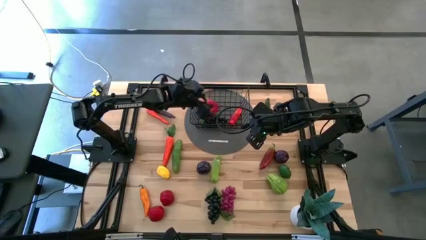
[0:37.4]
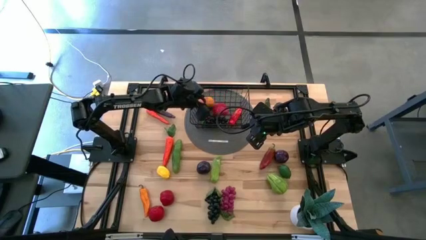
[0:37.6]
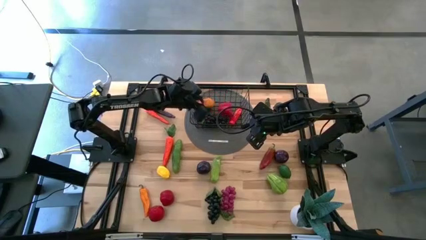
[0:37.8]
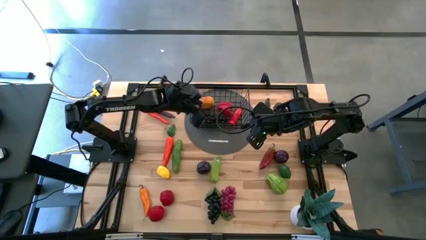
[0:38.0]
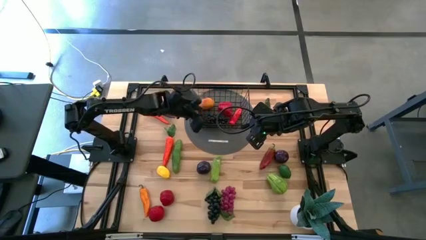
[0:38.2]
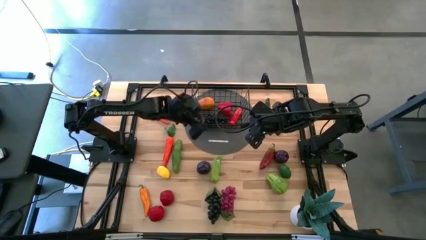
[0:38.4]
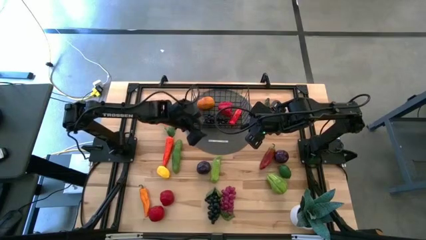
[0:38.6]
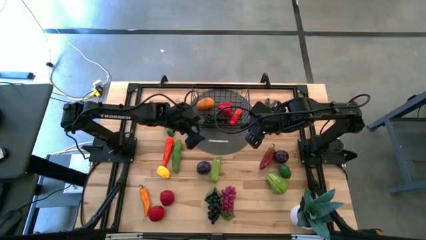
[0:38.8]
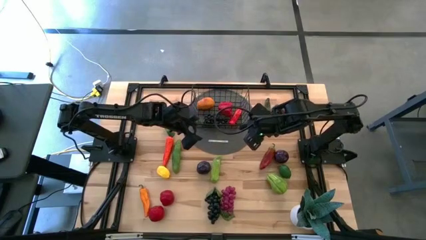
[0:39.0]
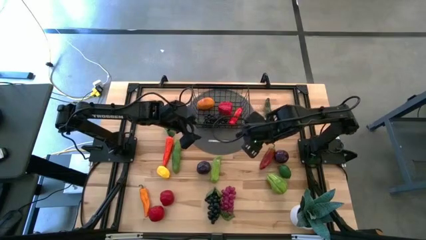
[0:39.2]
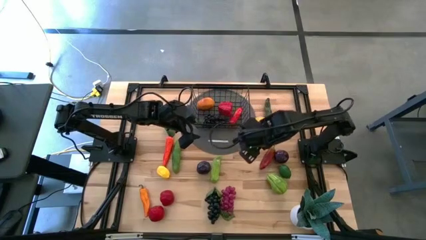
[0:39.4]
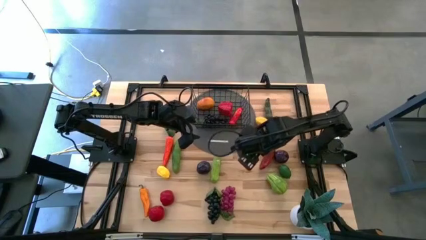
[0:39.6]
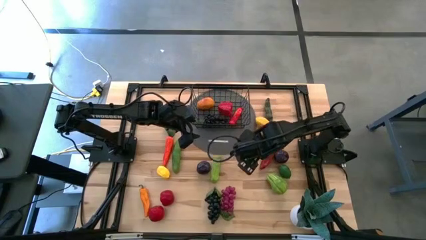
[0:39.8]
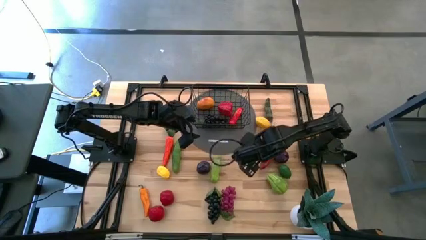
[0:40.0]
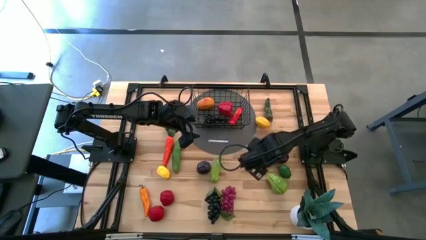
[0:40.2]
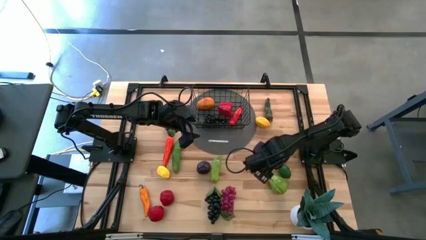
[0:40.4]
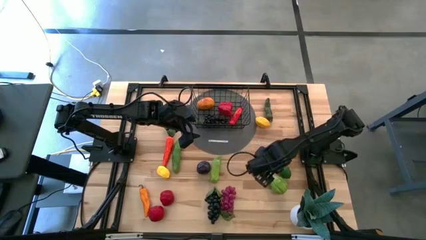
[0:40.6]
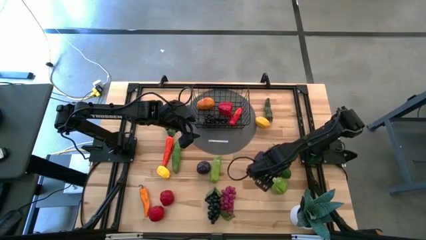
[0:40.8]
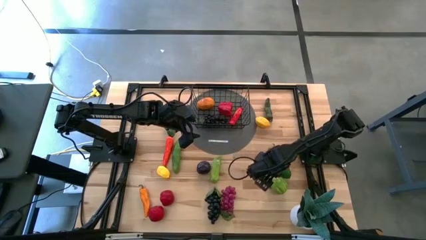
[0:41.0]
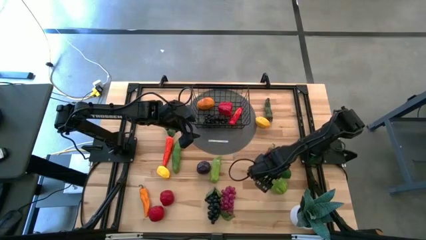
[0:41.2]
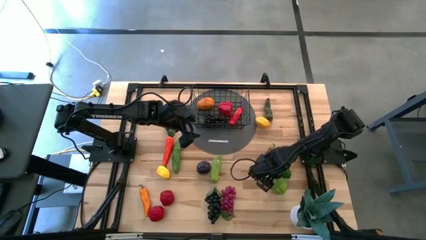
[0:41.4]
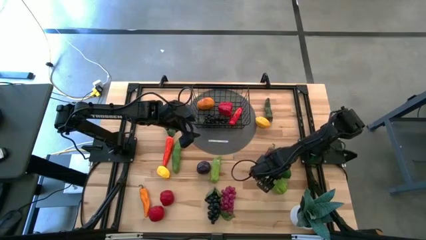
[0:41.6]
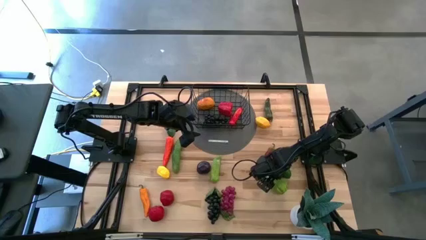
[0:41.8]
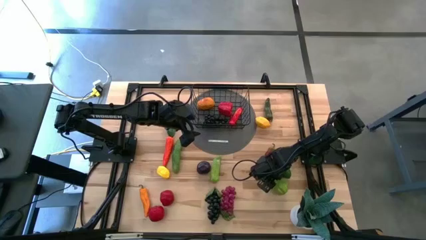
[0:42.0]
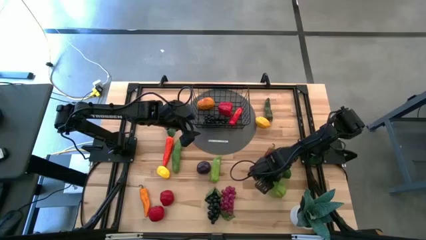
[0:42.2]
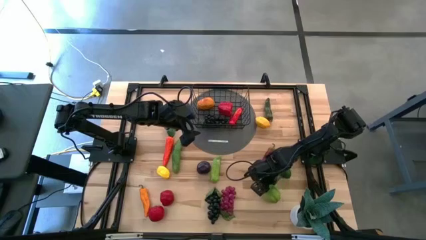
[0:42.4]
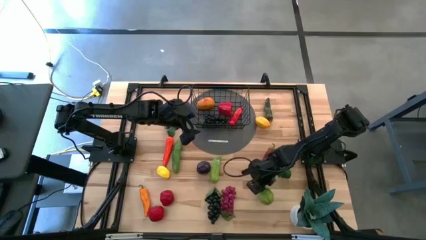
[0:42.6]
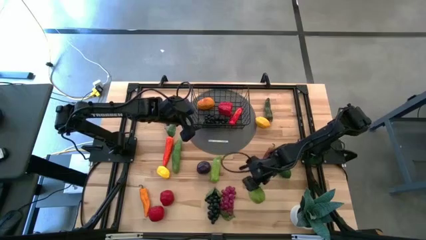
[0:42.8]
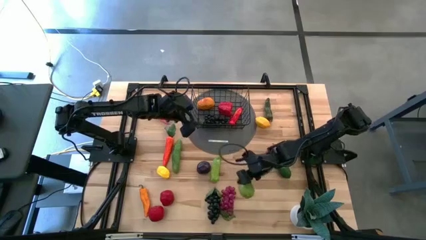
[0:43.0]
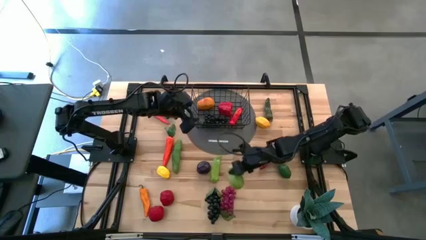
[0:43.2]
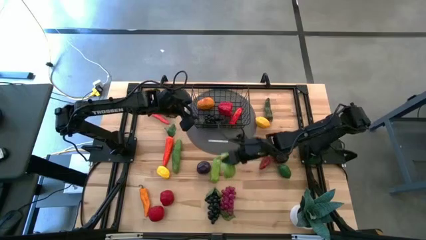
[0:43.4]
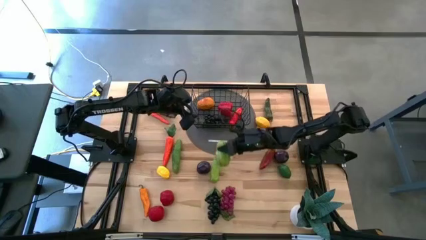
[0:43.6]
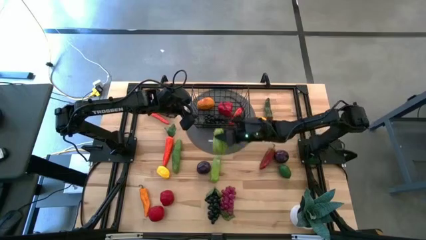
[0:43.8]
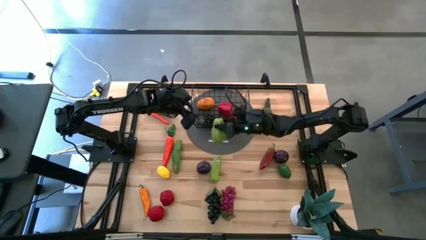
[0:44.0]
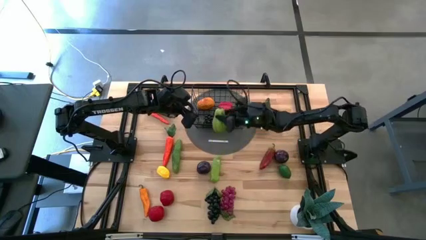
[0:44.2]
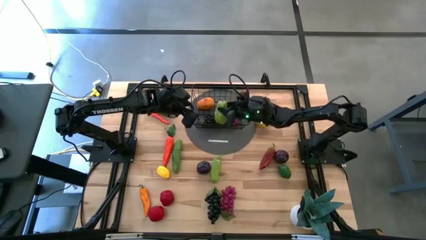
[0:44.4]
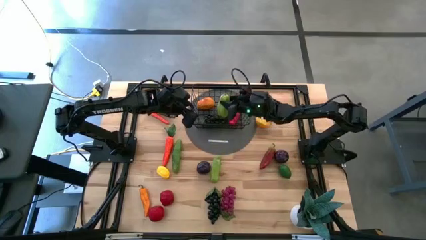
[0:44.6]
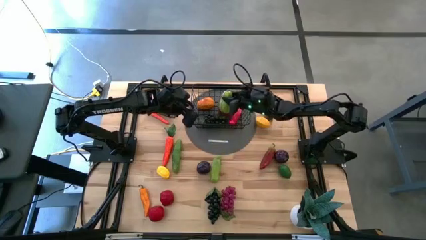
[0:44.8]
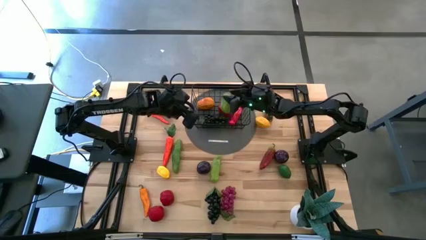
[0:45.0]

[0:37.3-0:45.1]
Task: Build produce basket
Put the green chayote into the black wire basket

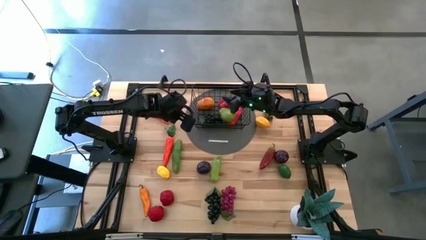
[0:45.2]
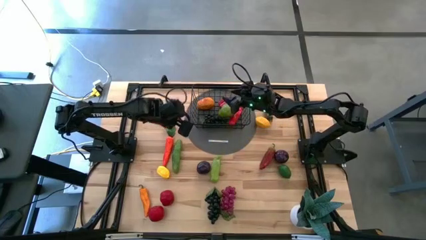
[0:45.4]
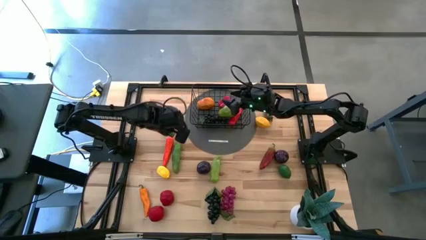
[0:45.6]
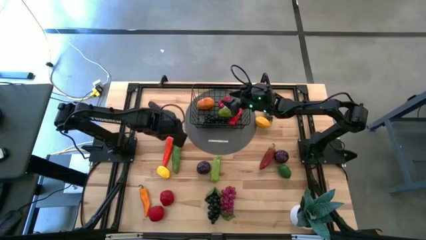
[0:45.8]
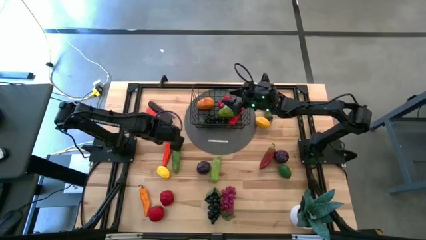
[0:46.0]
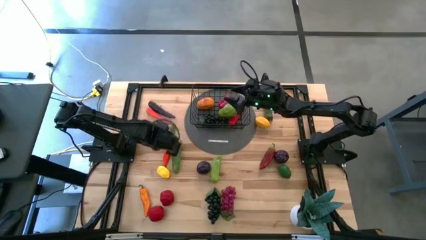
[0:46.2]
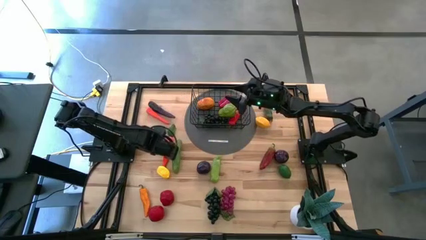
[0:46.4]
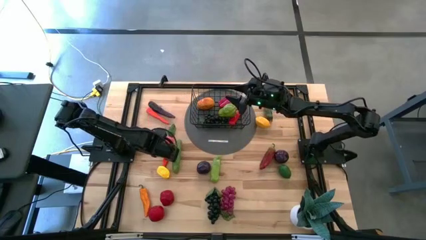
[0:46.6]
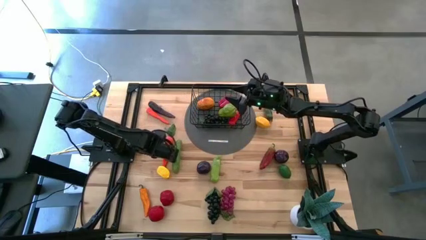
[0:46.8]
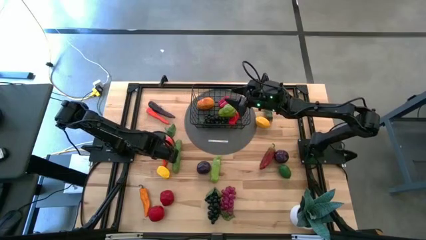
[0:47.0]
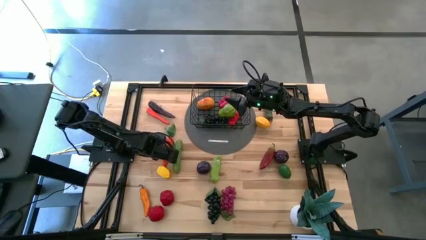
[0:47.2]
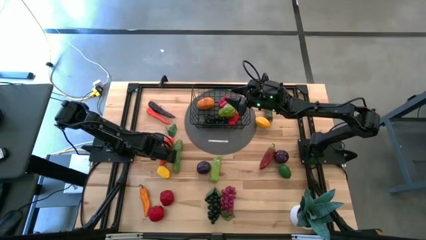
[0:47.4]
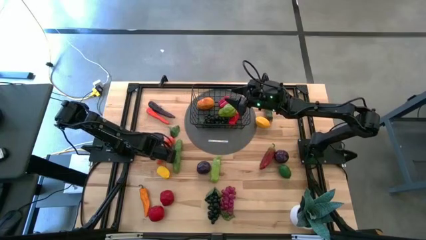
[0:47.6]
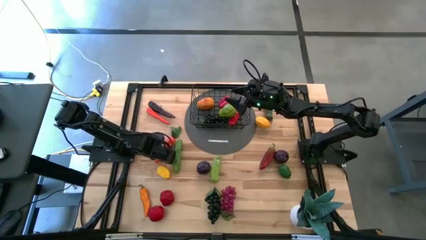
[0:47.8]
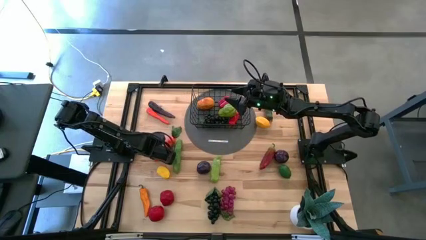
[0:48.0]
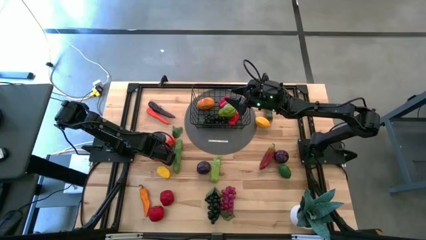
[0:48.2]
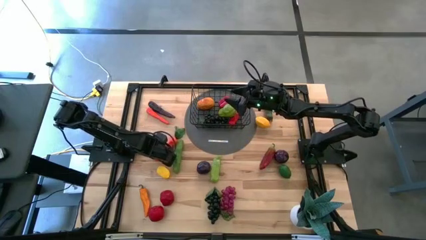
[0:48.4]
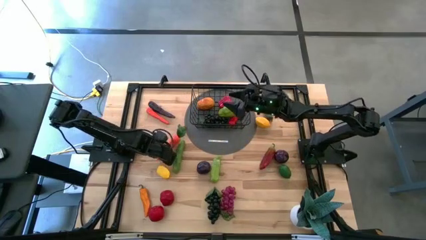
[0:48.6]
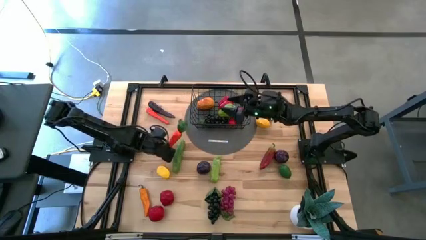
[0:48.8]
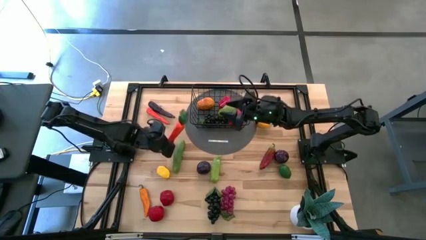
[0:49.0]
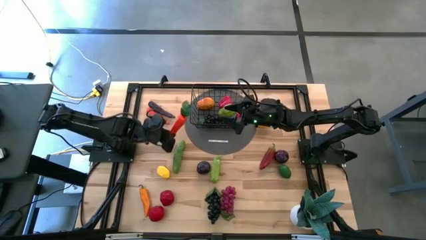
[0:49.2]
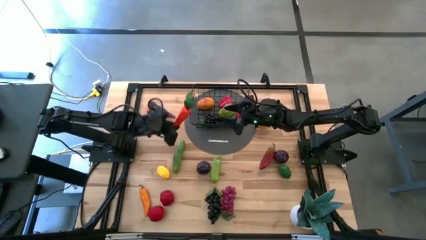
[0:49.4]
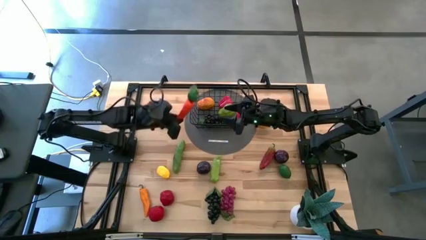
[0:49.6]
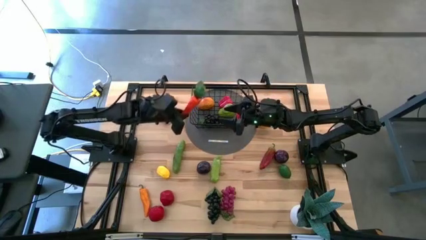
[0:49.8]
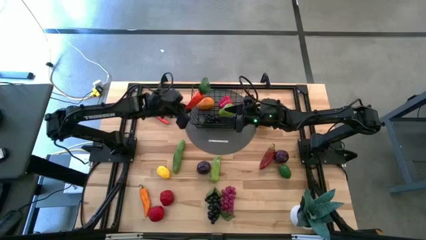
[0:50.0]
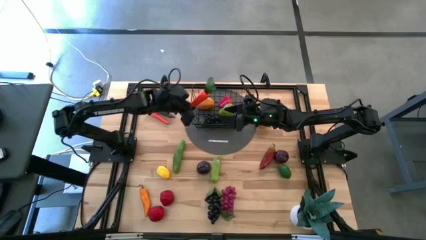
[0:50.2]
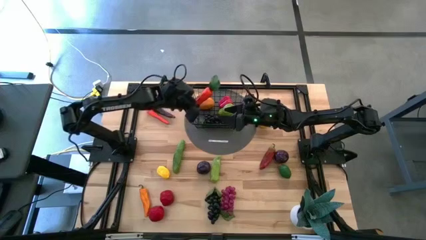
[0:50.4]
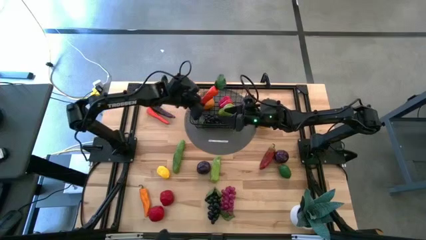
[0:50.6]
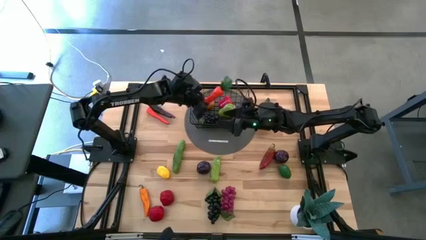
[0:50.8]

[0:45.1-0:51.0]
Put the bottom orange carrot into the black wire basket

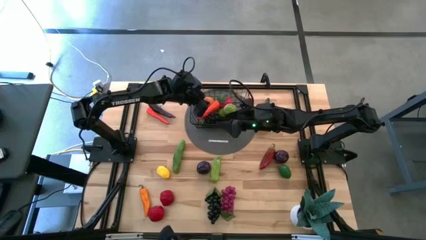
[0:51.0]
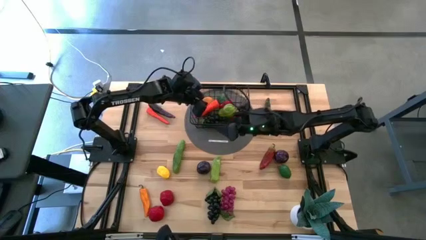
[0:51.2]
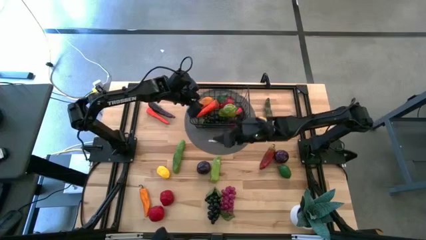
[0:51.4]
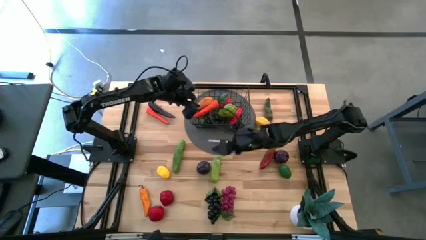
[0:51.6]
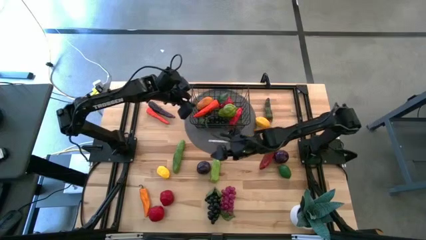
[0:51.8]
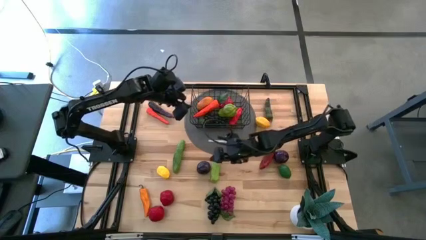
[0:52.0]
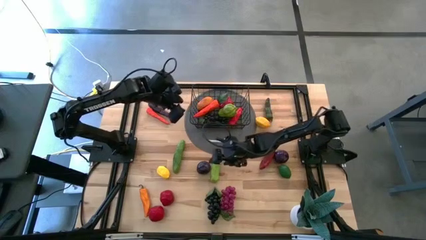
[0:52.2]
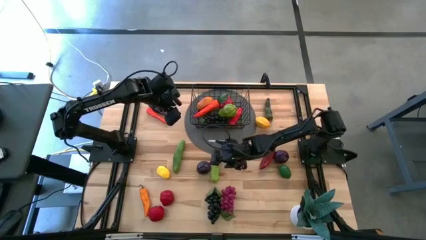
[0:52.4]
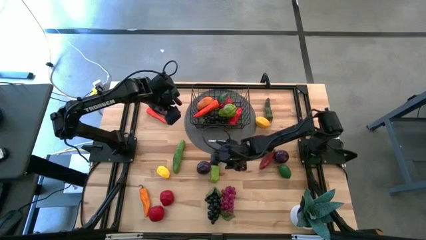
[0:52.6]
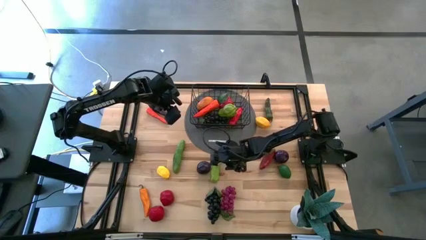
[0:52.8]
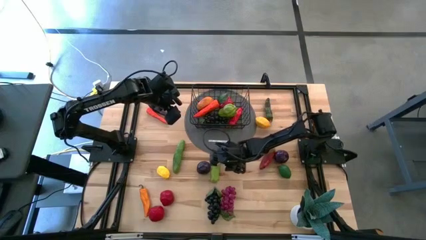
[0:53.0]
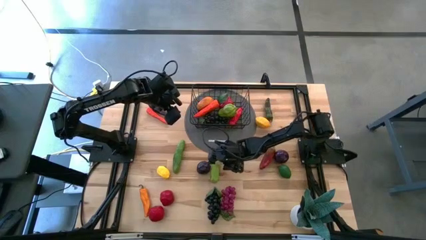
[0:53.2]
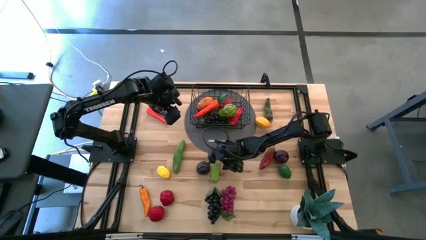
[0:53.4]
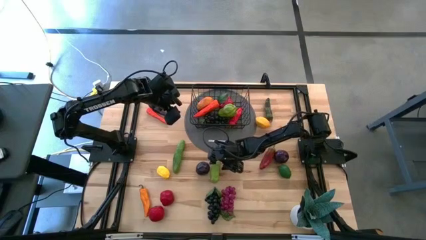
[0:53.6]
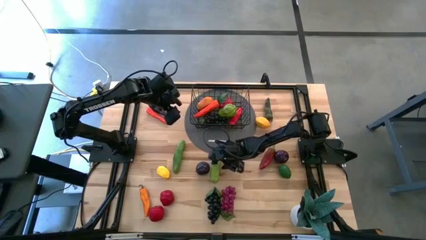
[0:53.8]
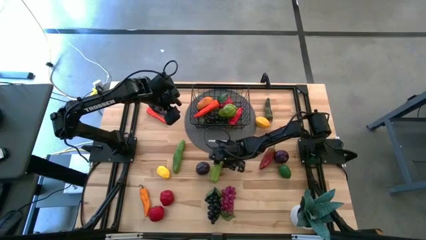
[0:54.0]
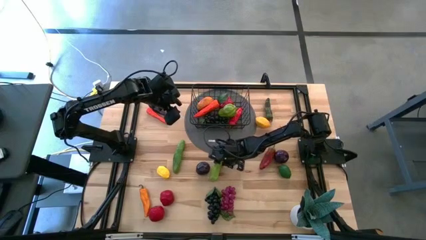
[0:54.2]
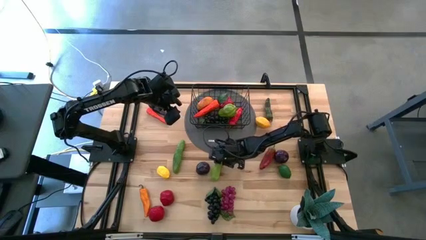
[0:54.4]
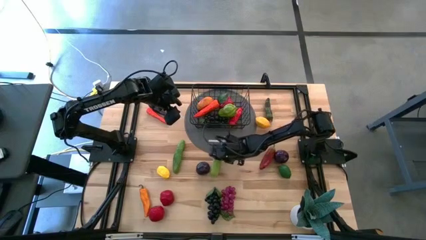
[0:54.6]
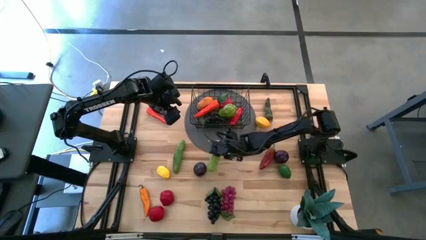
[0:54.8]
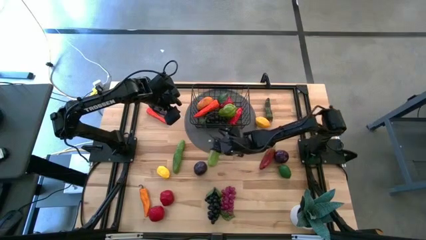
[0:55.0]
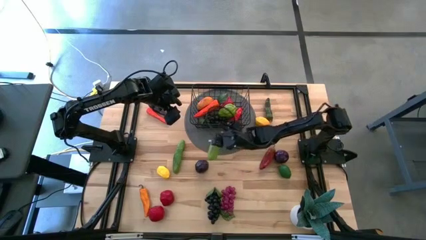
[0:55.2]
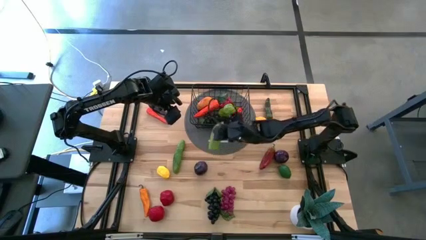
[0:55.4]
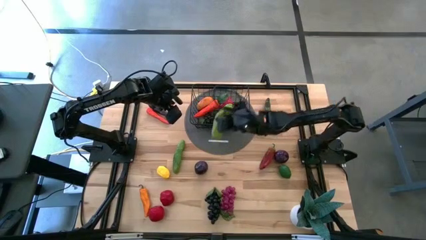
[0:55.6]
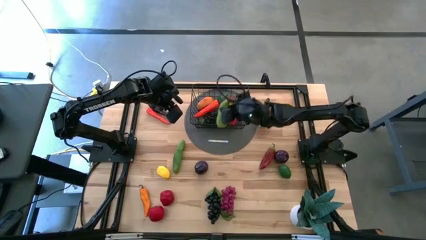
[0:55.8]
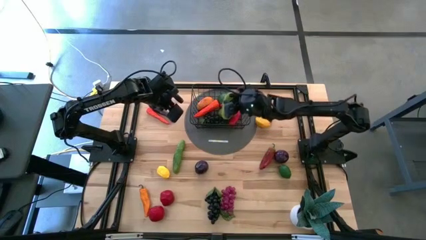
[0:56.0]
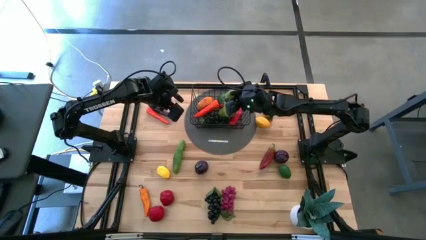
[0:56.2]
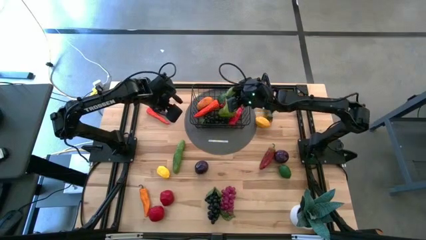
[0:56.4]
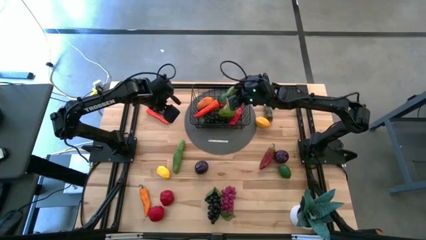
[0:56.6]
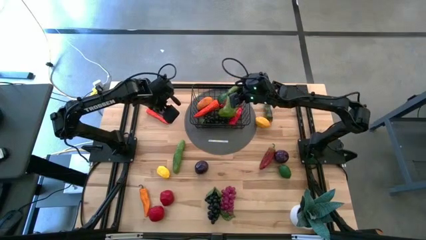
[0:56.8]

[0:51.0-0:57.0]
Put the right green cucumber into the black wire basket
